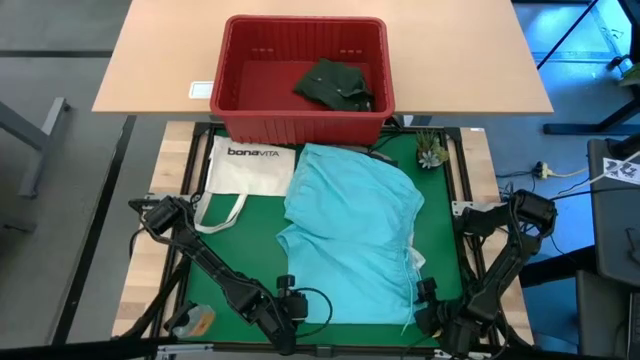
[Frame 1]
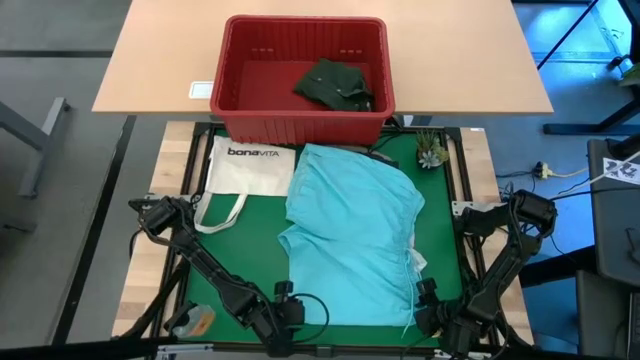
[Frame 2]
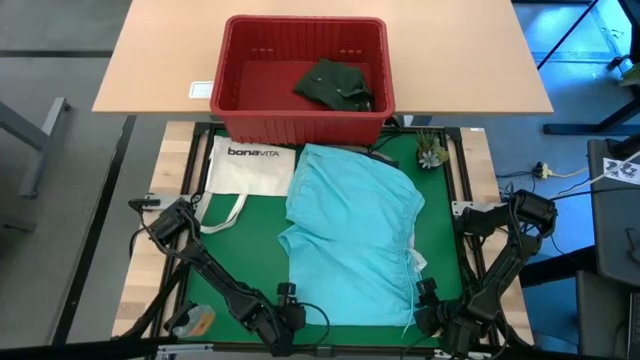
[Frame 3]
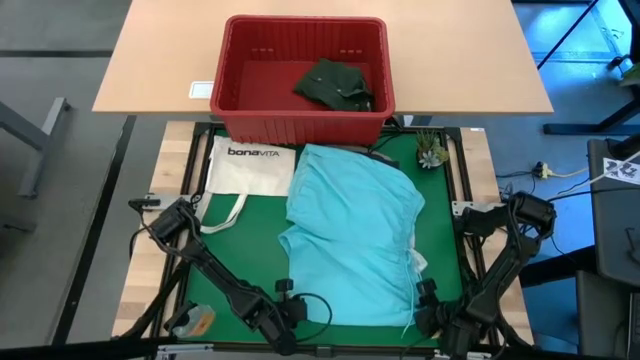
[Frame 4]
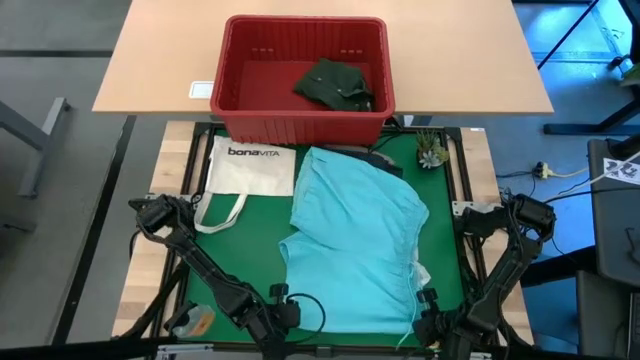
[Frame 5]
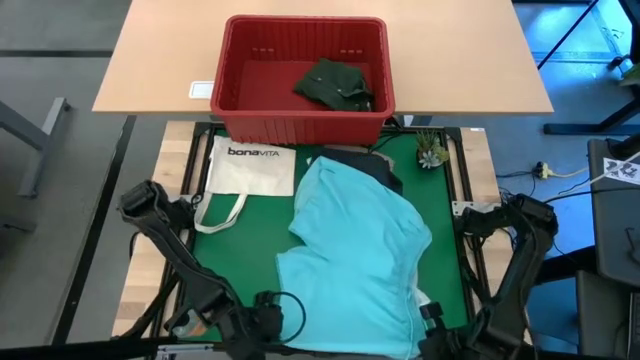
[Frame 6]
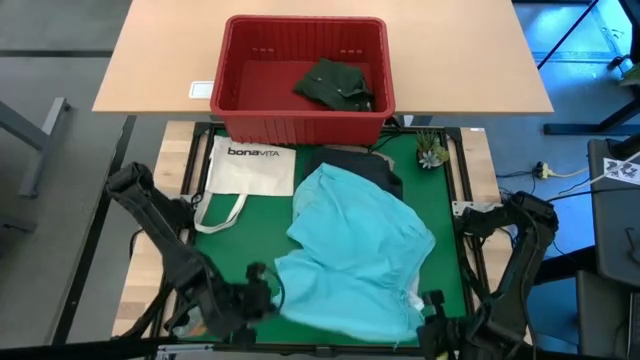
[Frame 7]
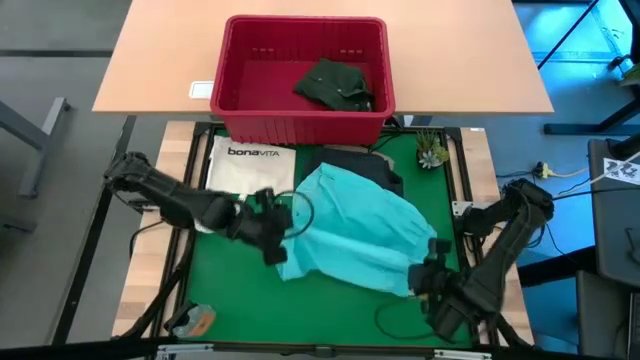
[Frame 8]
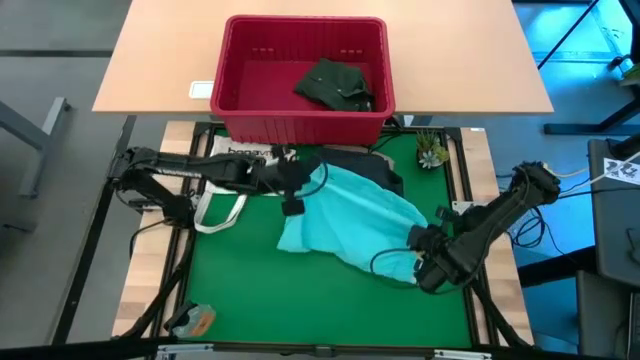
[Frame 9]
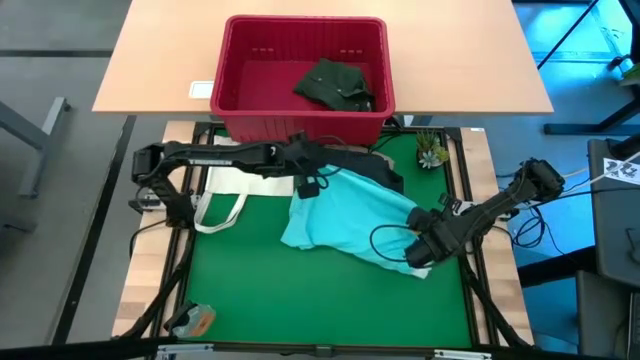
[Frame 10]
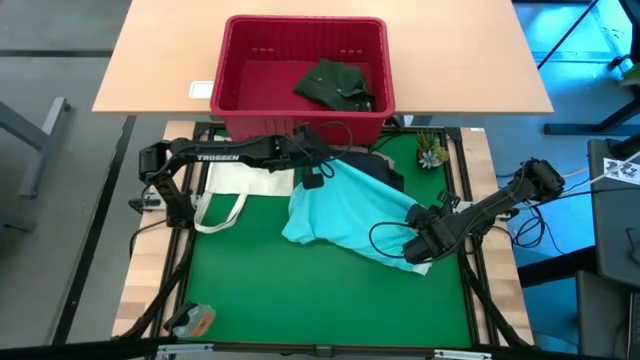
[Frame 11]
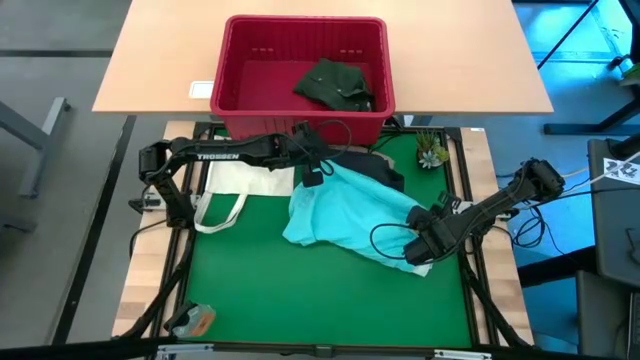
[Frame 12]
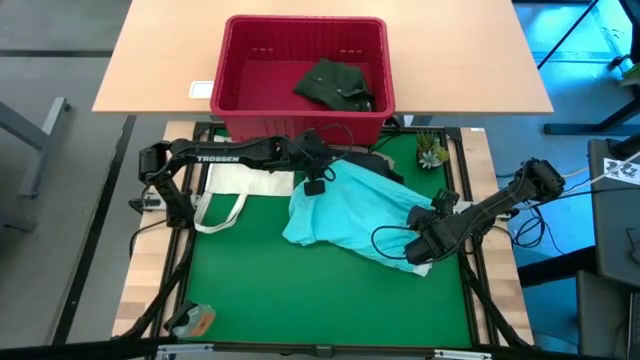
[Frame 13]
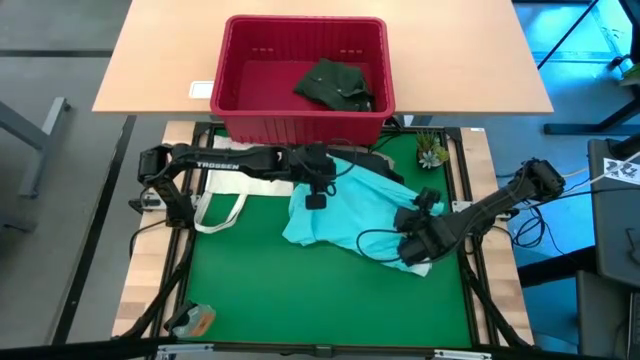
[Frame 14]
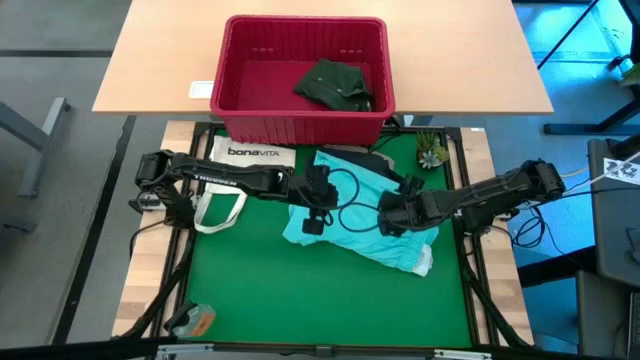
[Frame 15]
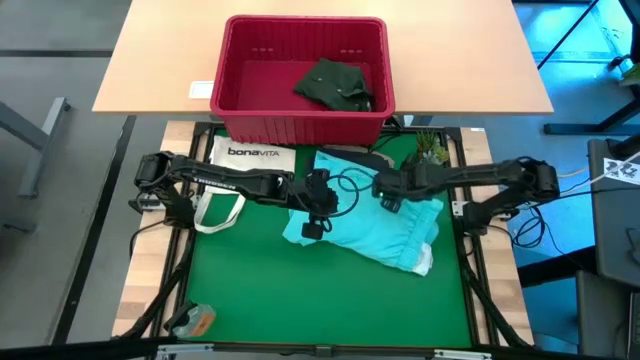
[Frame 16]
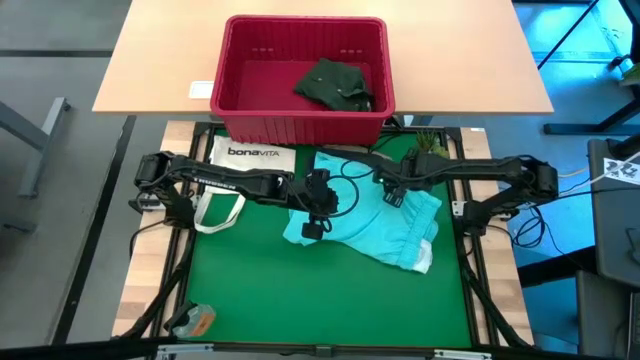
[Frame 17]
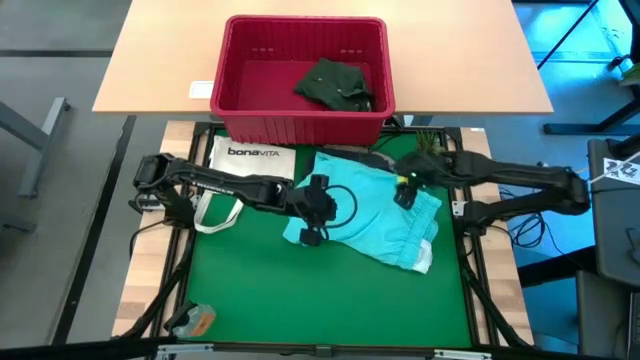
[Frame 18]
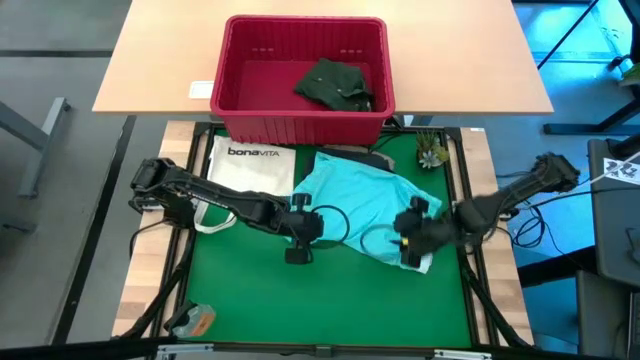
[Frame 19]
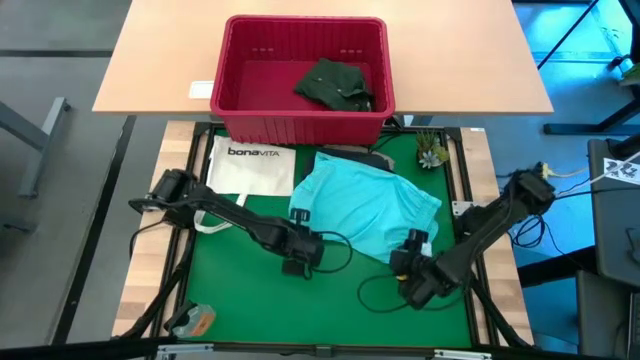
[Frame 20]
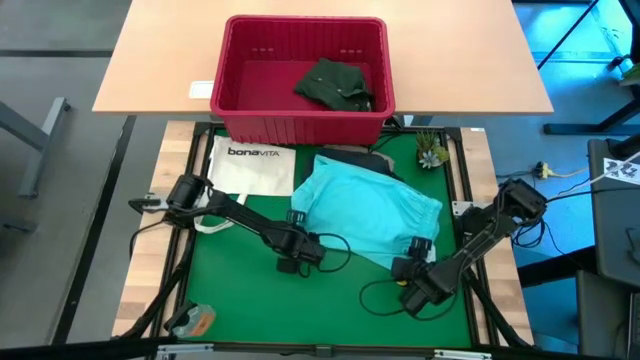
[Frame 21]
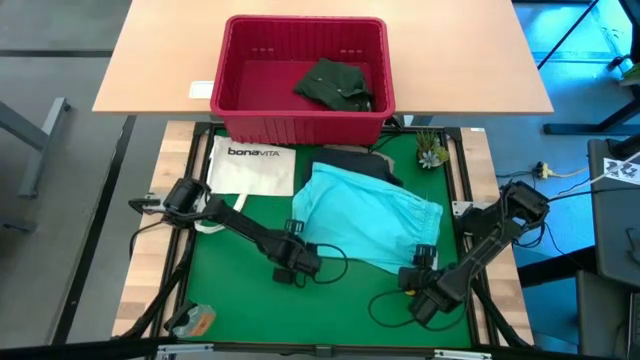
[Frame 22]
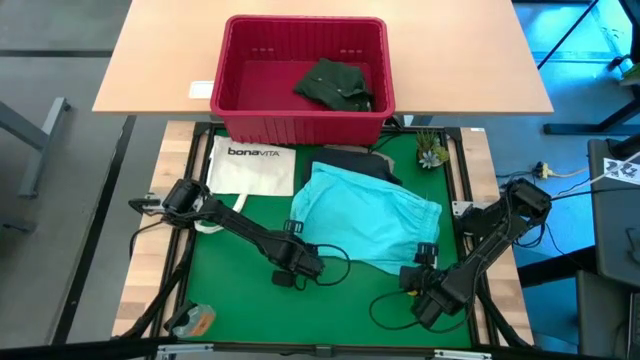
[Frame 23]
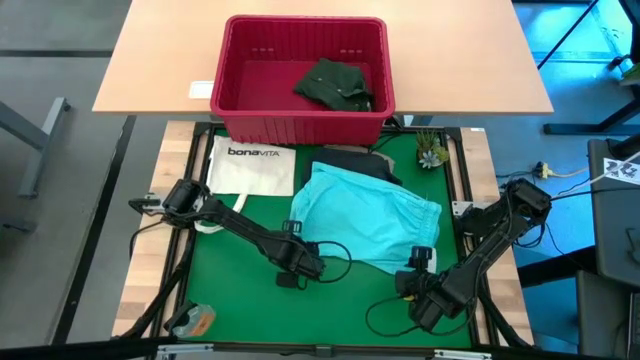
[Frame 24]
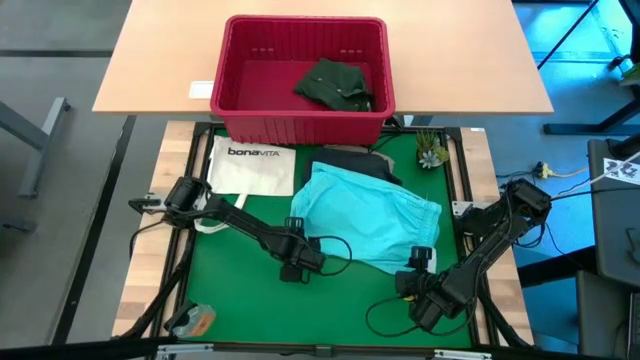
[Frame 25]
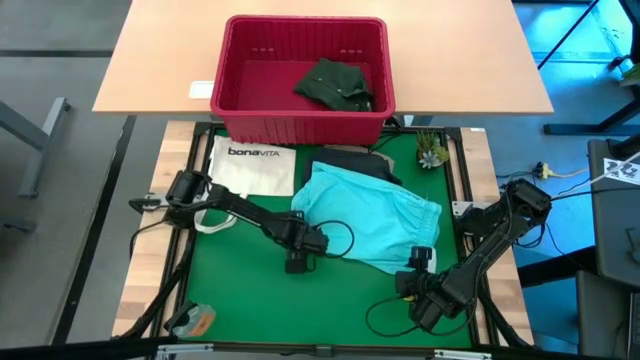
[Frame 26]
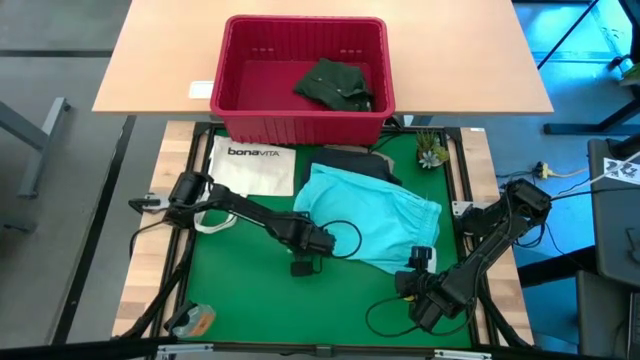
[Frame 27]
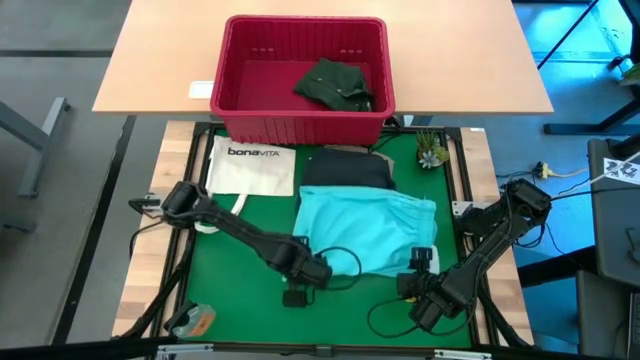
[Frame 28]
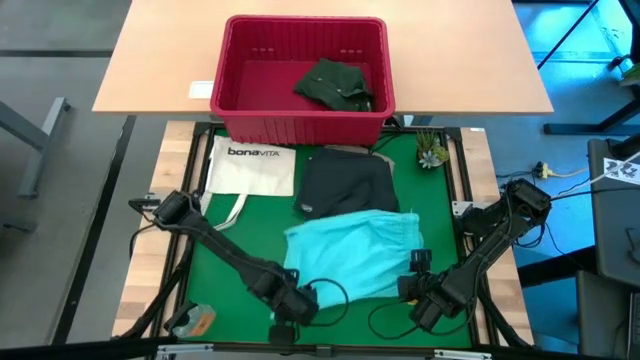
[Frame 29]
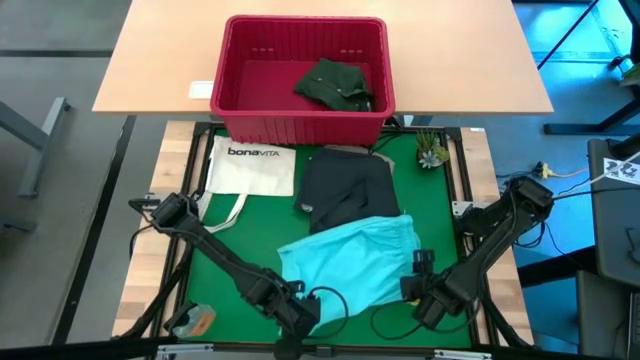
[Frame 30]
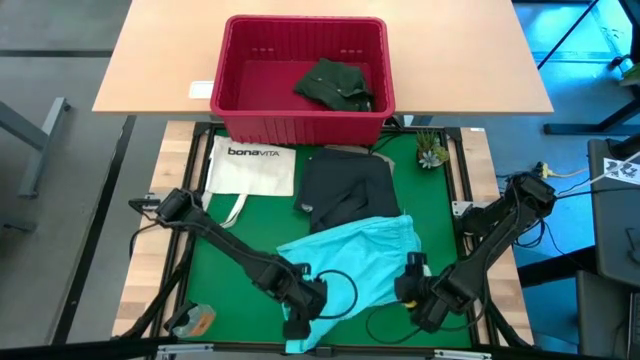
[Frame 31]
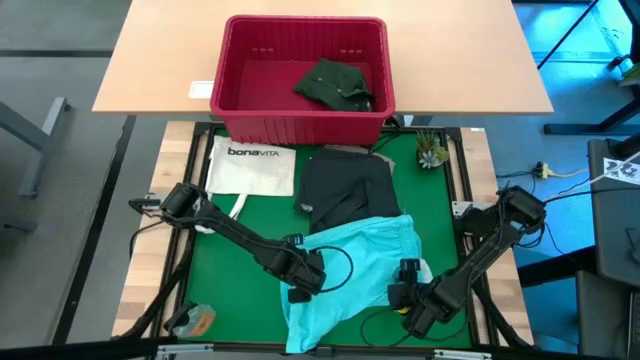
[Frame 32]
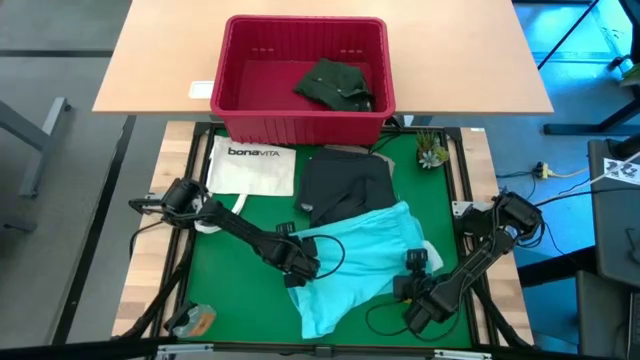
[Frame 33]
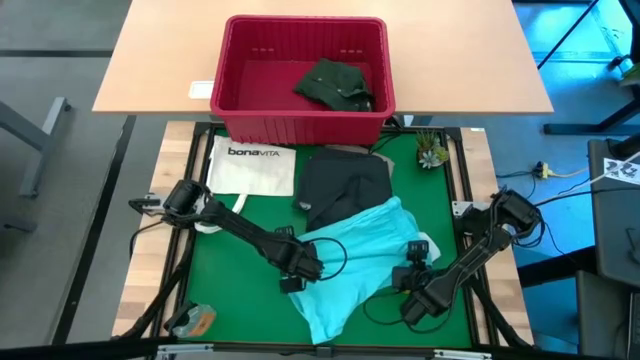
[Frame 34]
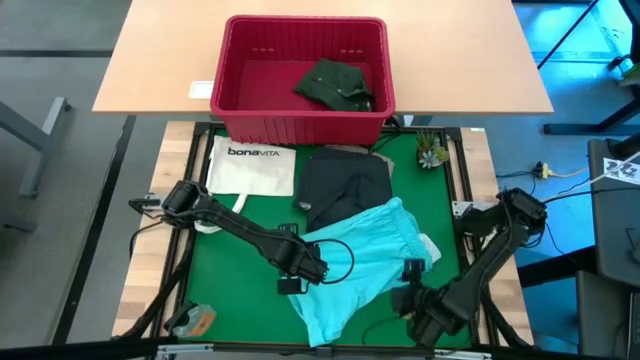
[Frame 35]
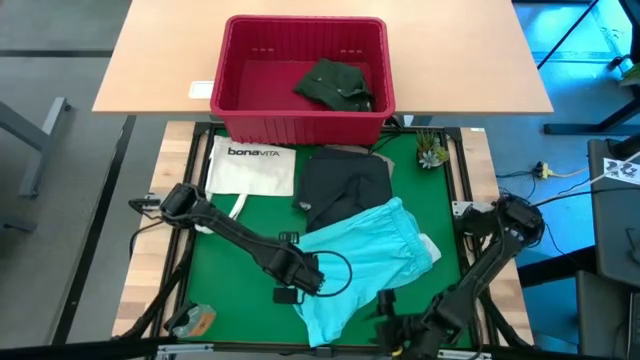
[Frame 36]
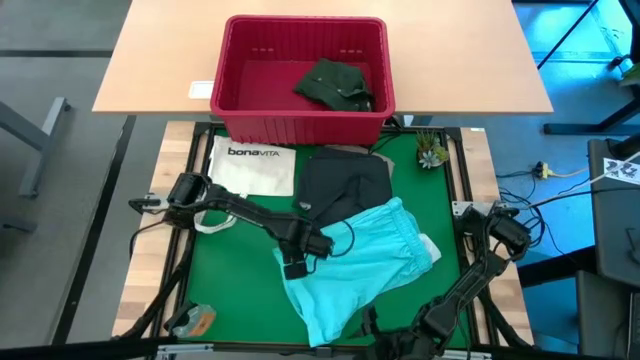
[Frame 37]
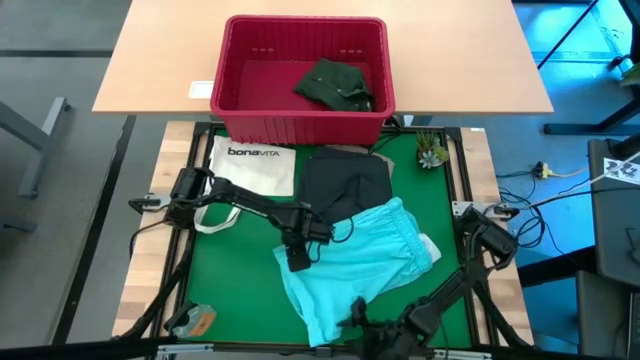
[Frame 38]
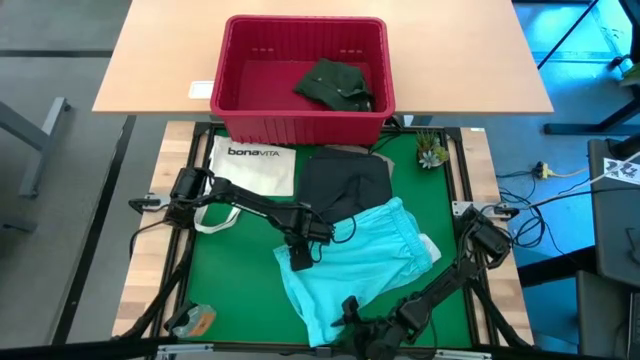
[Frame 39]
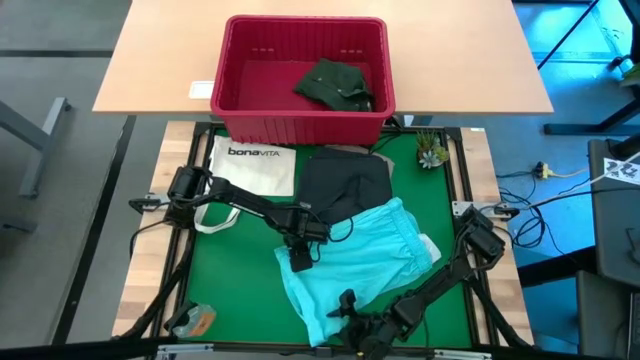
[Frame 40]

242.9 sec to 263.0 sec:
Task: Fold Laundry from Bin
Fold the light blue shorts from the red laundry bin

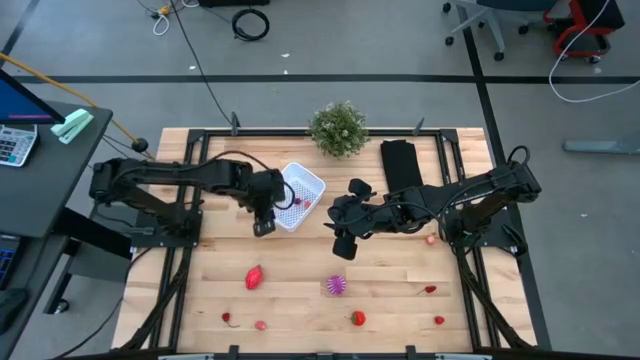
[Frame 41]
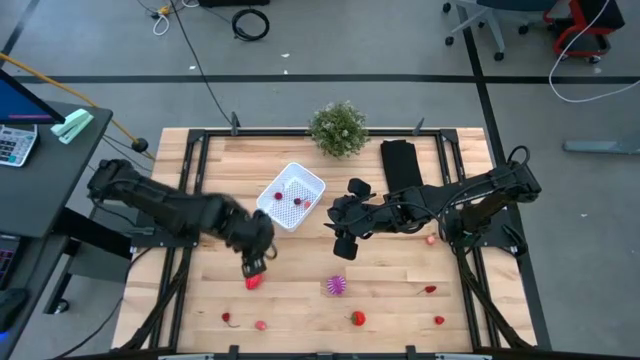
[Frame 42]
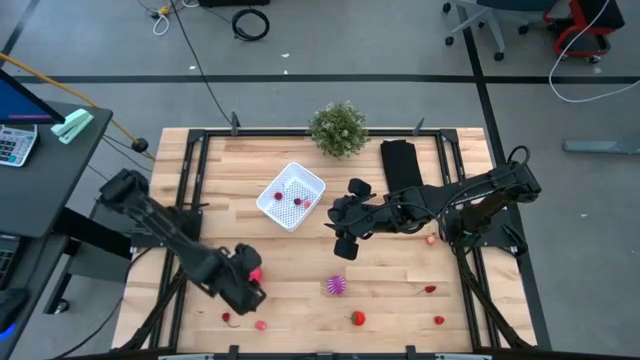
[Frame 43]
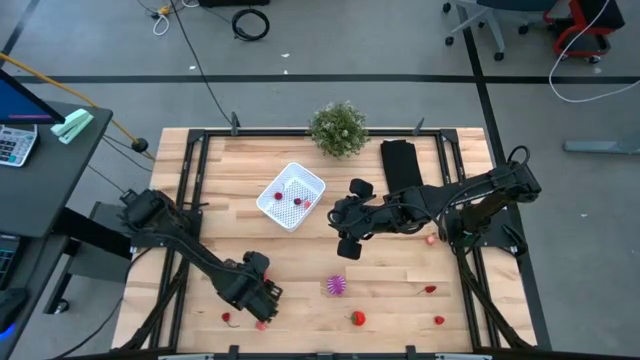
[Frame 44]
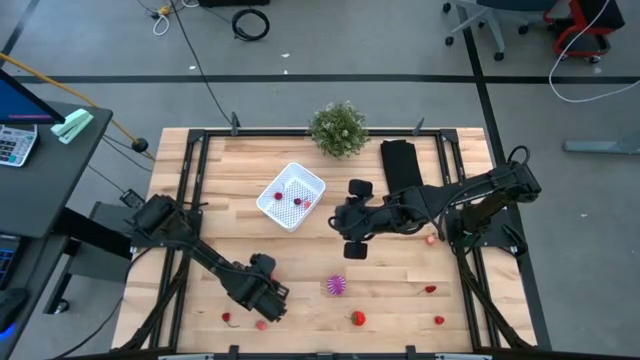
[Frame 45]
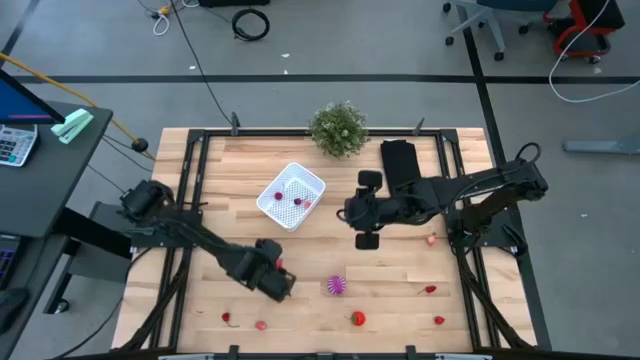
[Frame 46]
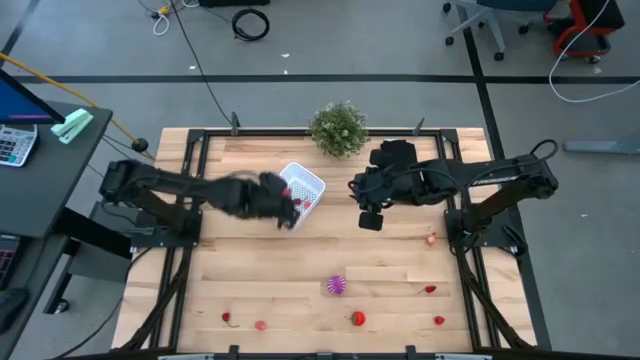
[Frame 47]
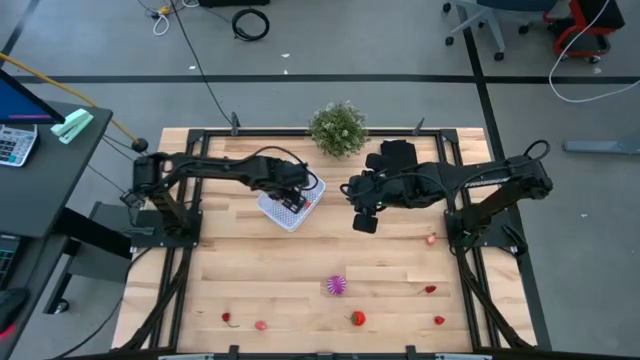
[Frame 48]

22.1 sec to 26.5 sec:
Task: Pick and placing Produce into tupperware
Put the pink dragon fruit into the white basket
